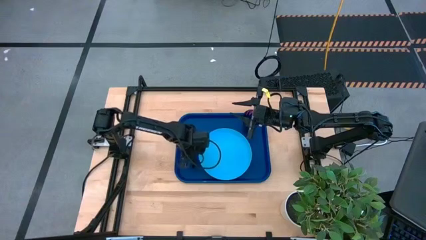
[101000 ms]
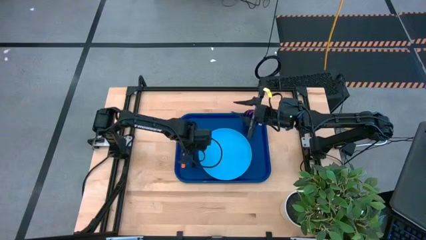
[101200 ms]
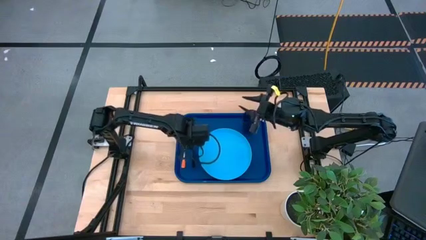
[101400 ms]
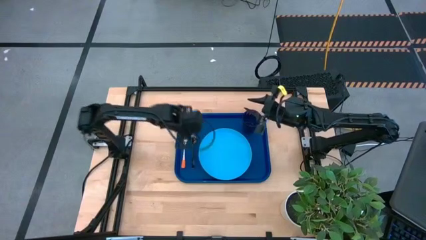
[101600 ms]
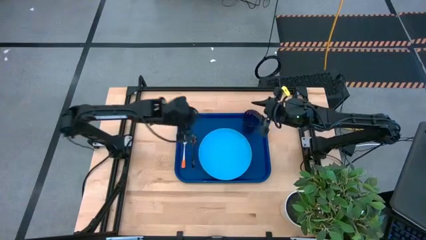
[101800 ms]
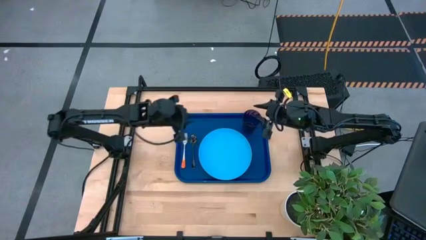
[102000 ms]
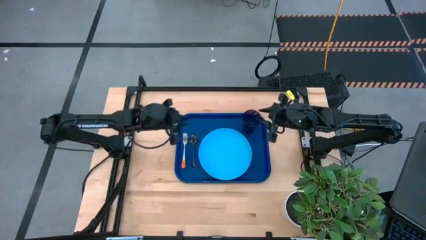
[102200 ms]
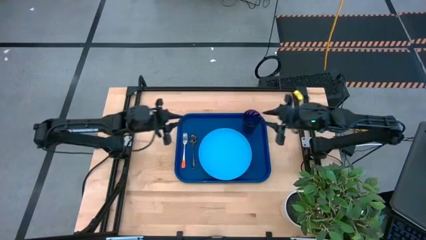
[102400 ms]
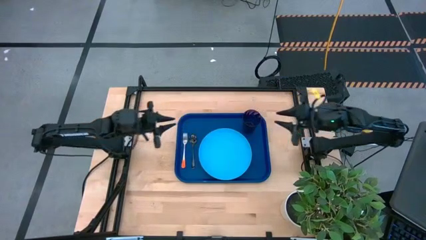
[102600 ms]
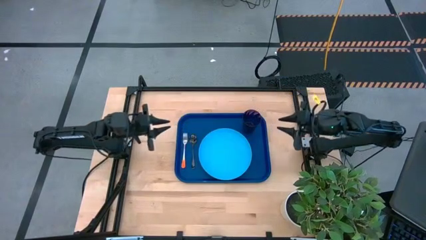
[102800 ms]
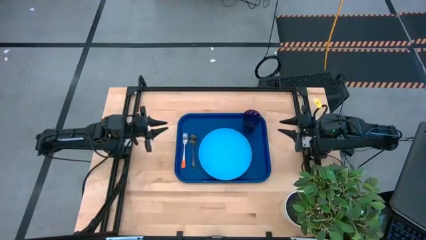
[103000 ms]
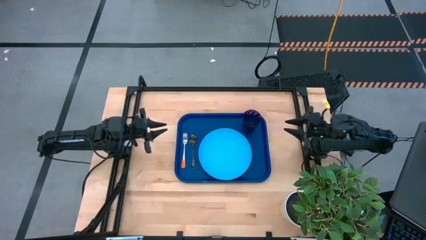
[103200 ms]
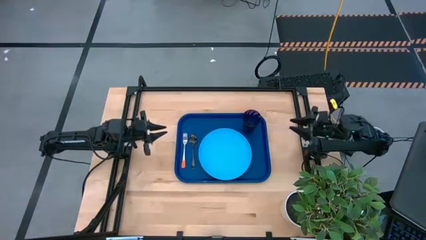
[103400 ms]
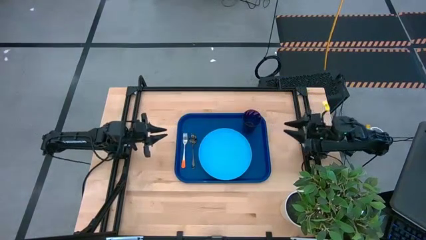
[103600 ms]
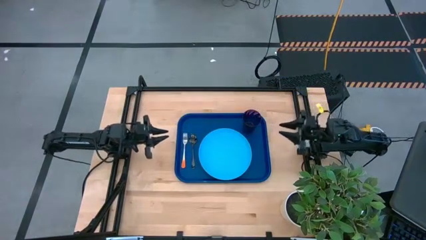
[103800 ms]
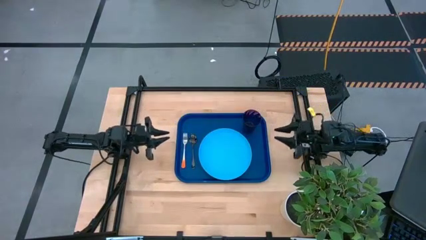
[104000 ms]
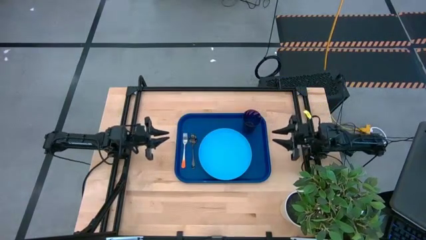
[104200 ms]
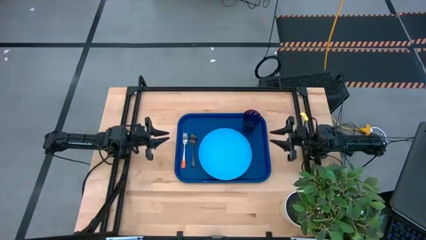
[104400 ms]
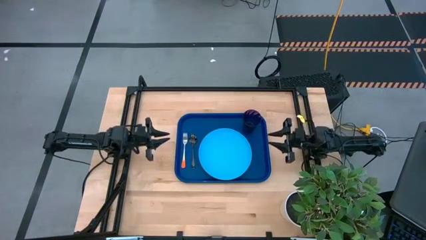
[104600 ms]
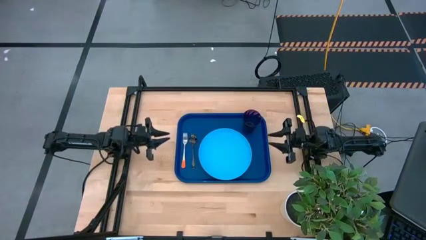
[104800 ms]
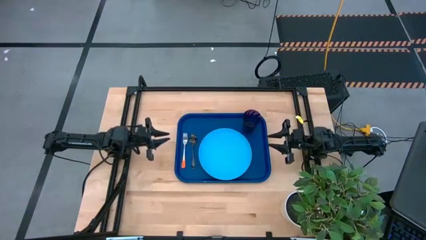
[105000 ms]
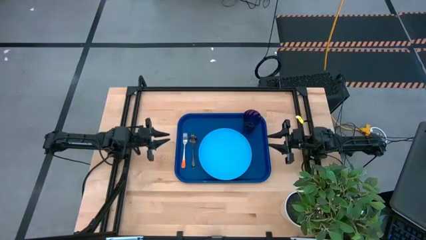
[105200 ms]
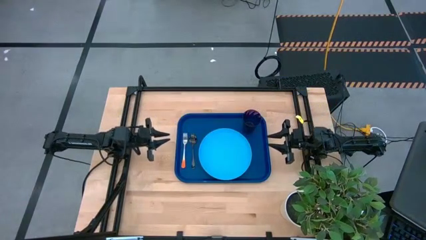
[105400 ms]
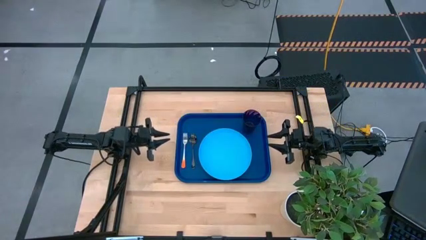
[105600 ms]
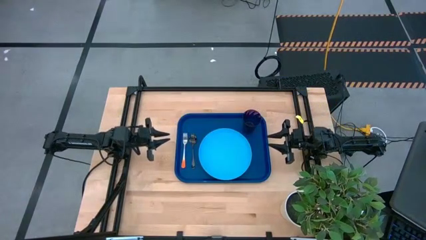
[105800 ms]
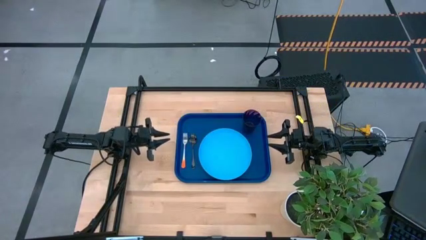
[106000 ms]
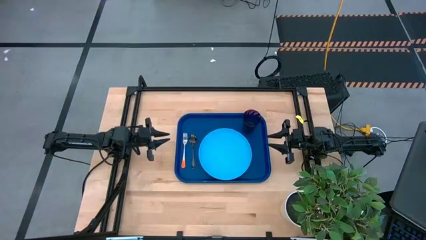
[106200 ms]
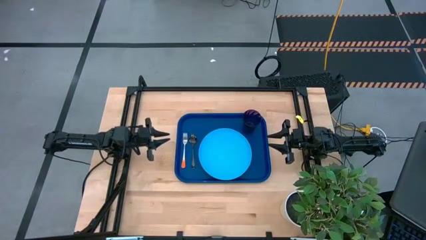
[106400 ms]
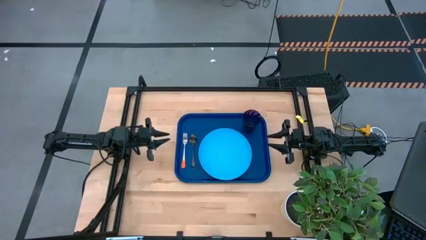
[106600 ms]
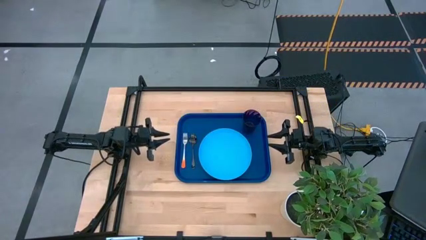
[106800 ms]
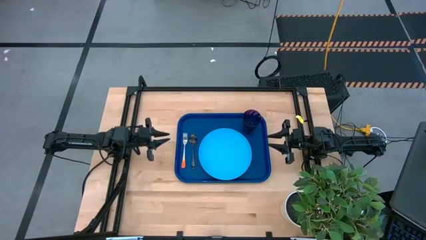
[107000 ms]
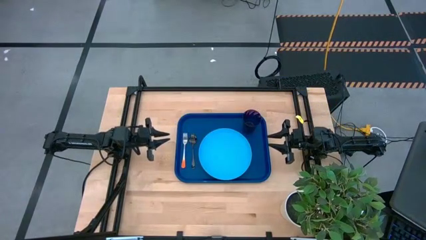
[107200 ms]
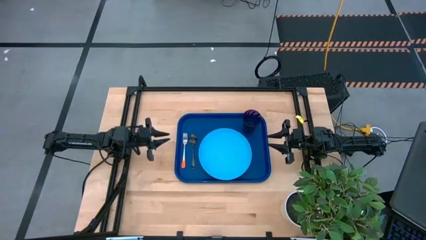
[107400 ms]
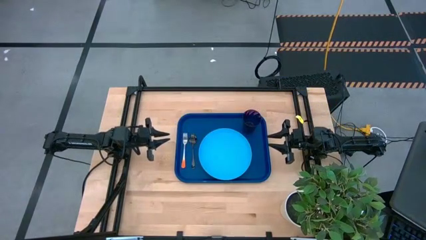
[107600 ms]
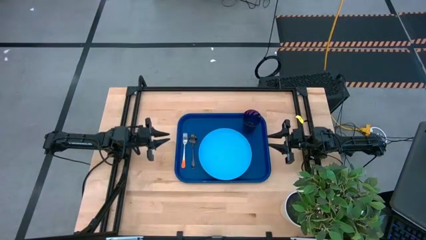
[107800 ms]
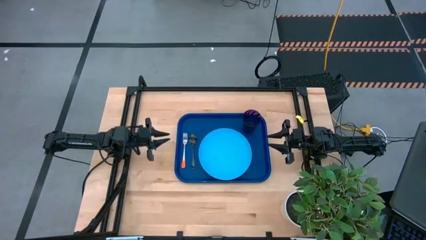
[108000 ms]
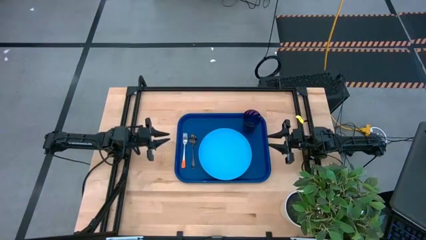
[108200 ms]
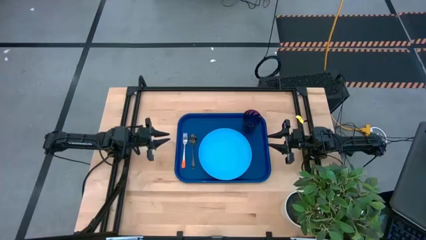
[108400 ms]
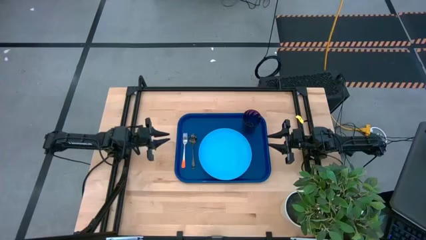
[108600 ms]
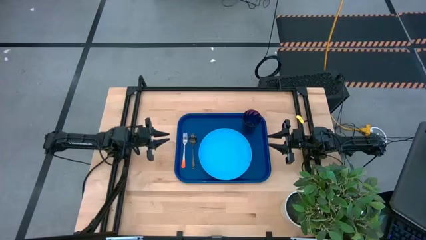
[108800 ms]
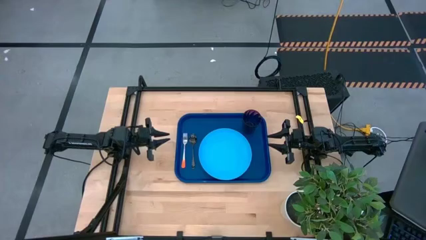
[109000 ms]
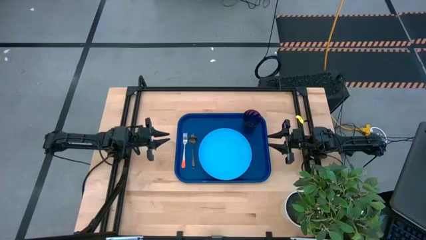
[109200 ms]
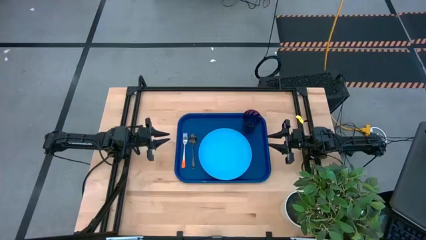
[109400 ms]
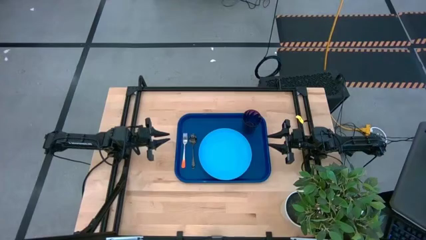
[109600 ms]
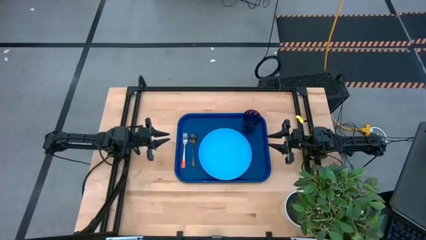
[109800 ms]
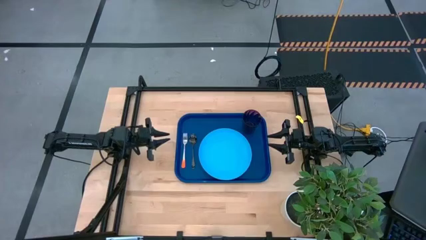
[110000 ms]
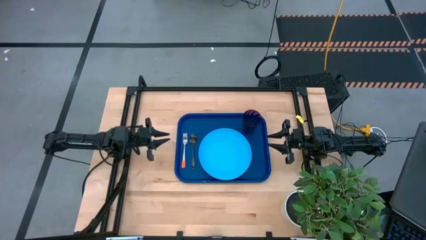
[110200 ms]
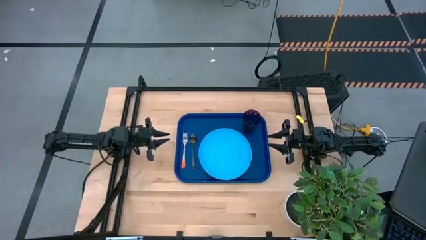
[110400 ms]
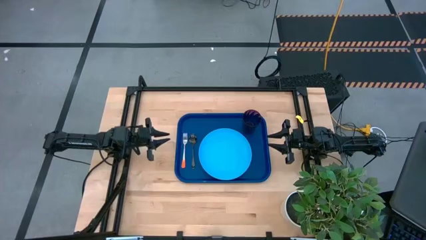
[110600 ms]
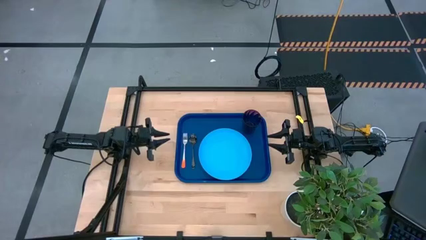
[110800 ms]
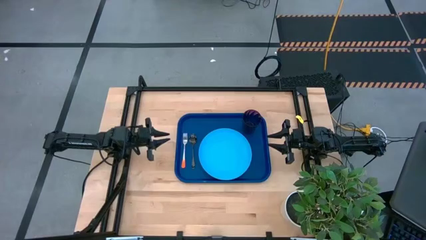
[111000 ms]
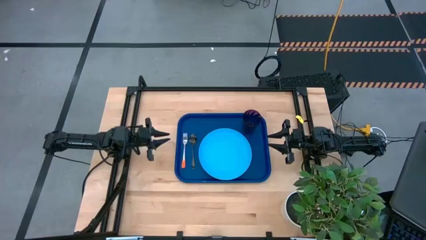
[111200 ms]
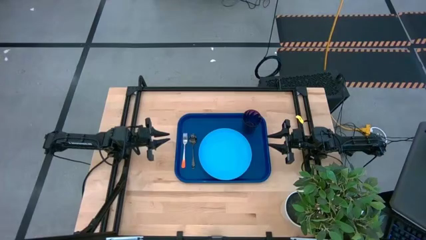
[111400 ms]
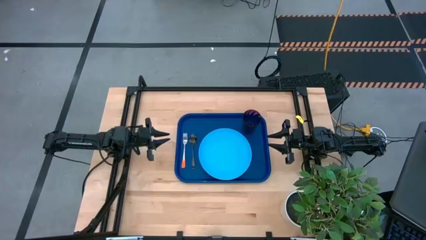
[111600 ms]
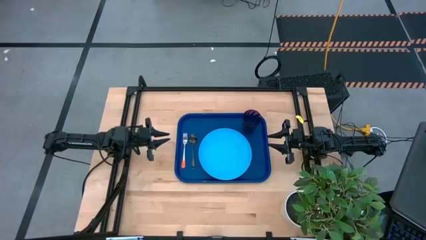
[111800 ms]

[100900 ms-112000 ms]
Task: Pick and place plate/cup/fork/spoon on tray
Return to Home Position

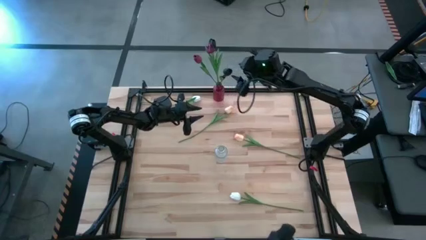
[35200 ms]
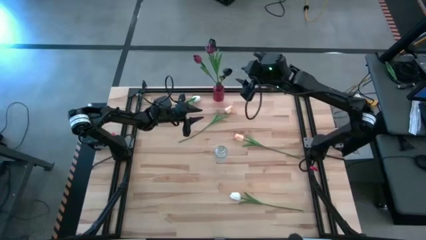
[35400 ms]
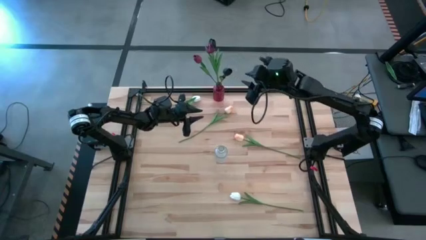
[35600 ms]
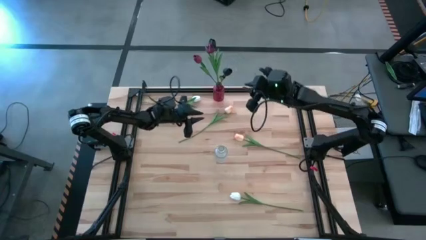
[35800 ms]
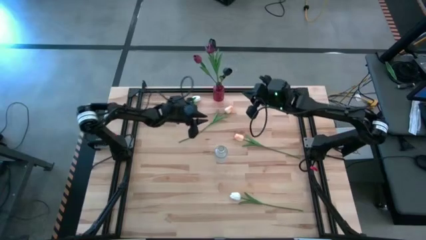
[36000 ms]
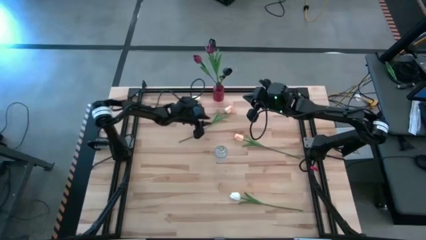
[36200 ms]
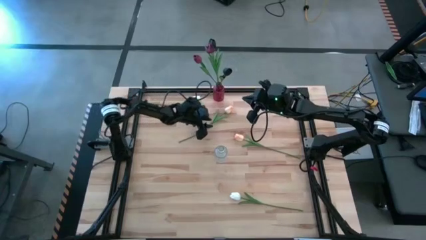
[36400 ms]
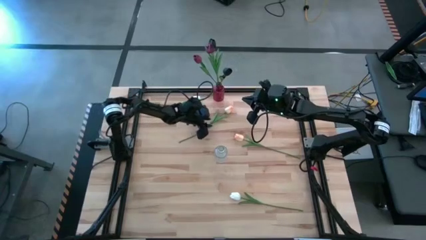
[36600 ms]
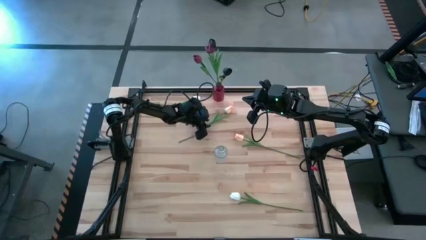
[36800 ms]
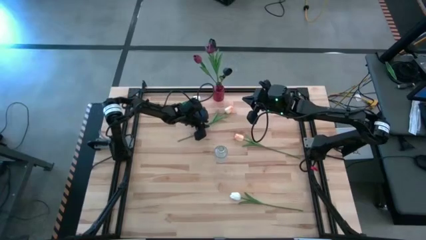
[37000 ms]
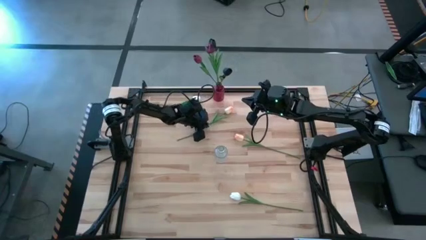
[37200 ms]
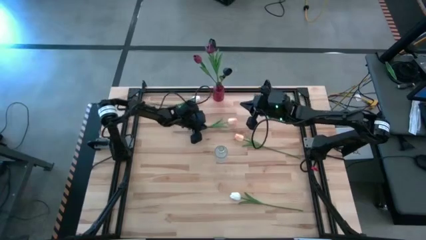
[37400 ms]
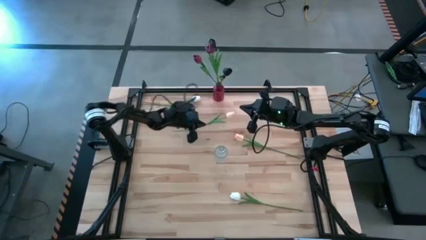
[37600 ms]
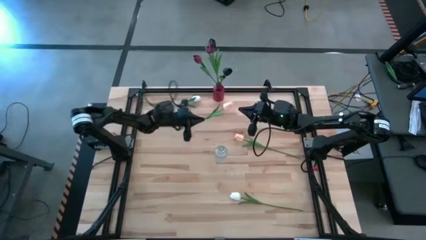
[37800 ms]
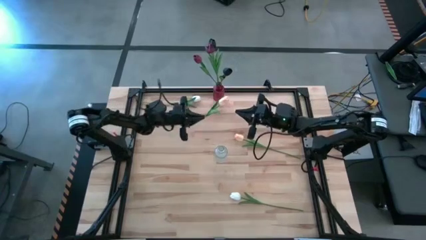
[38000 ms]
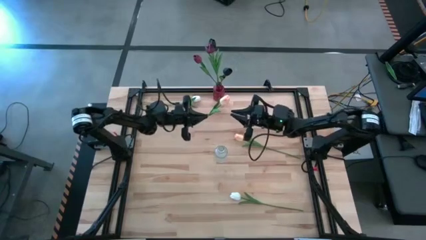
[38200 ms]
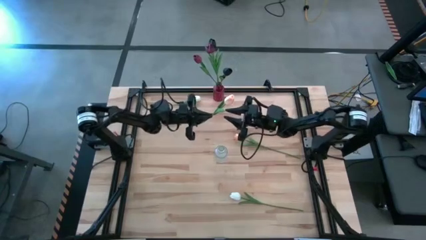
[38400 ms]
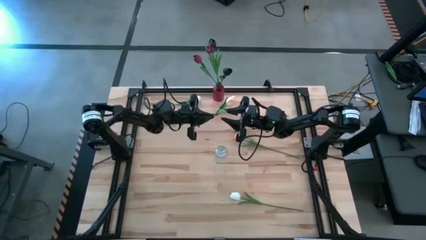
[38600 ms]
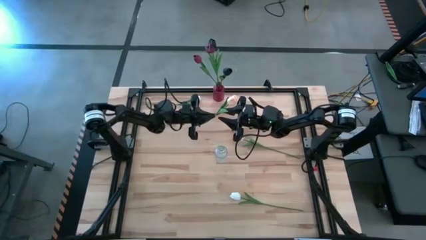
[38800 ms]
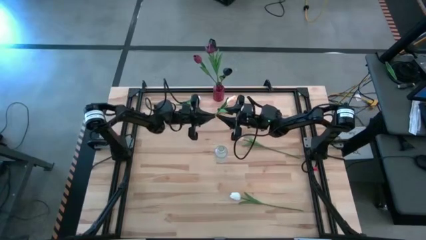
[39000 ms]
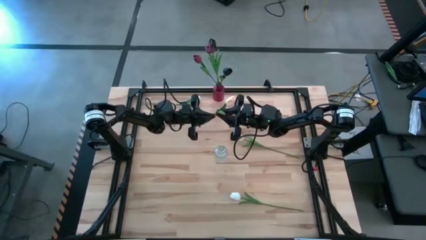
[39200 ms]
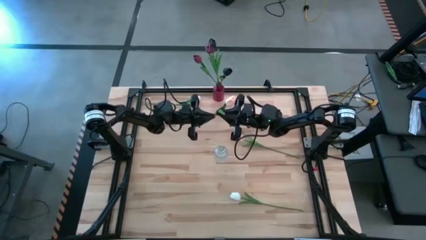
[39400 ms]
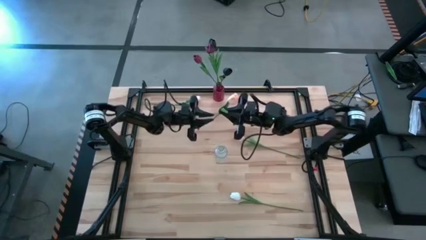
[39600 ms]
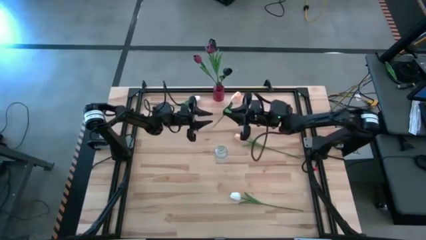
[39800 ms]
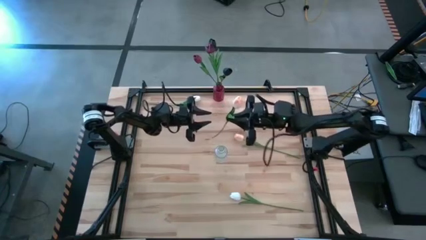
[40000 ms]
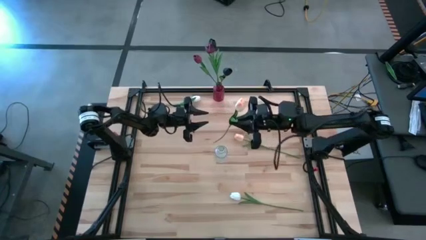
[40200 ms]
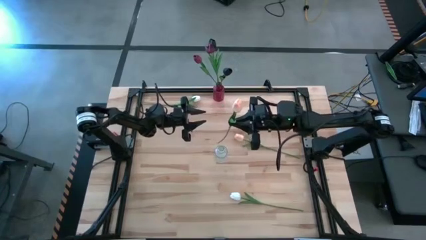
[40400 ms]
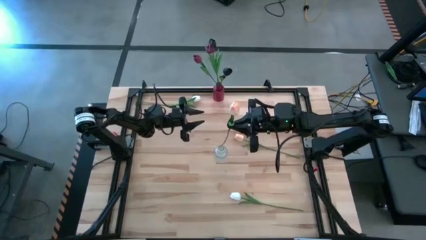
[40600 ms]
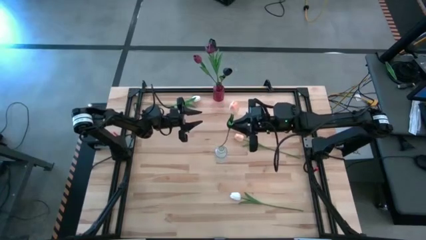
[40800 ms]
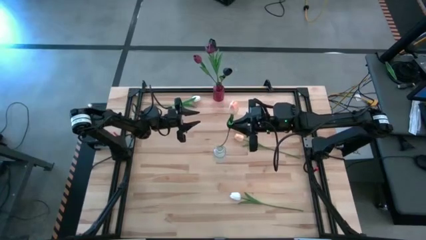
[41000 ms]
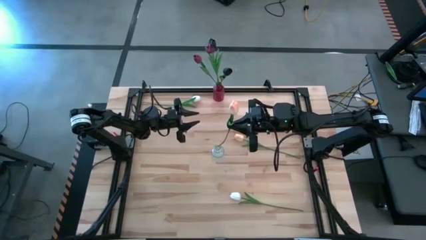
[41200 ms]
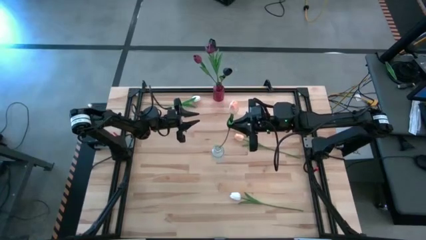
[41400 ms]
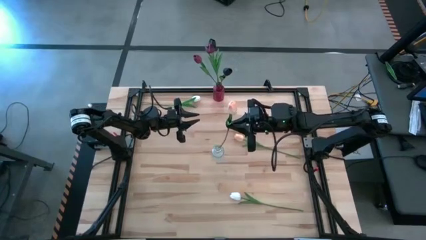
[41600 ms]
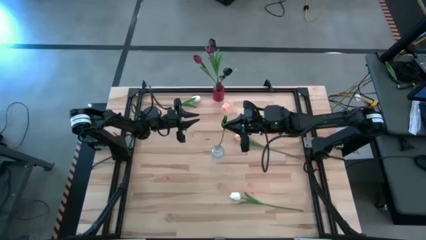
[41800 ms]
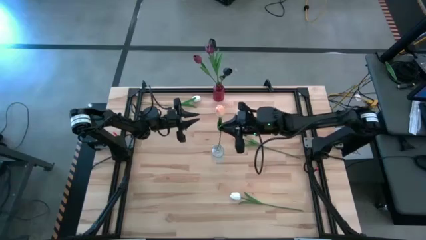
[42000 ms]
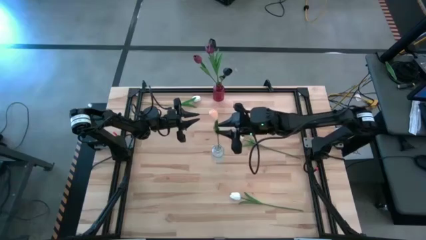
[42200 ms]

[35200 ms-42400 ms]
Task: Sort flowers into vase by color
Put the top orange tulip into the transparent vase
